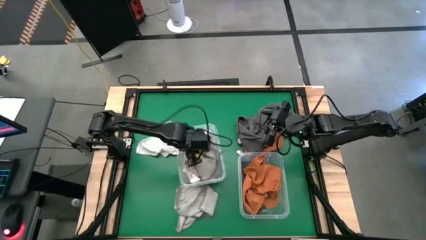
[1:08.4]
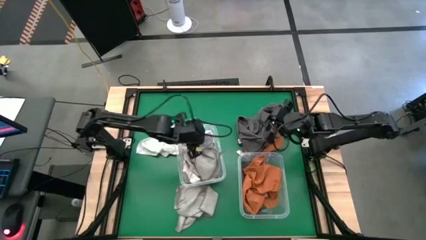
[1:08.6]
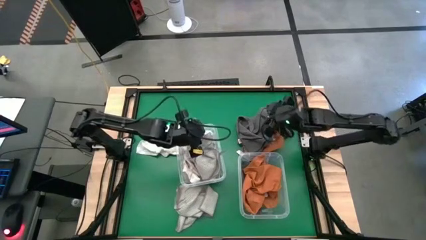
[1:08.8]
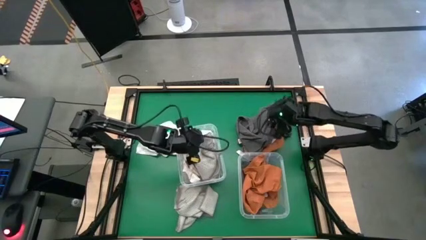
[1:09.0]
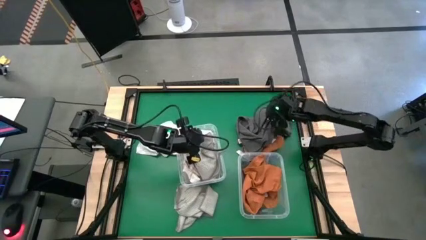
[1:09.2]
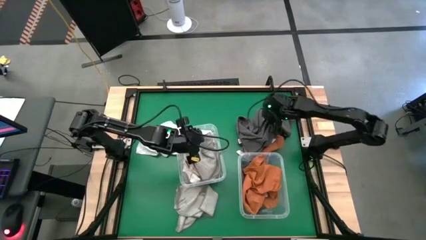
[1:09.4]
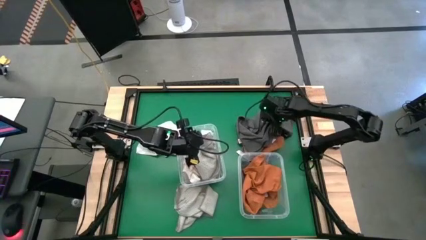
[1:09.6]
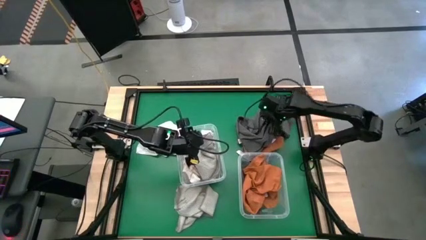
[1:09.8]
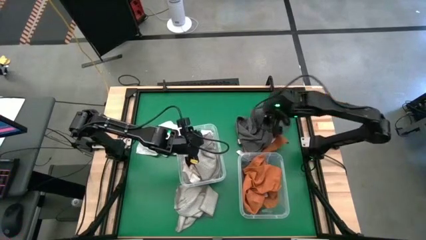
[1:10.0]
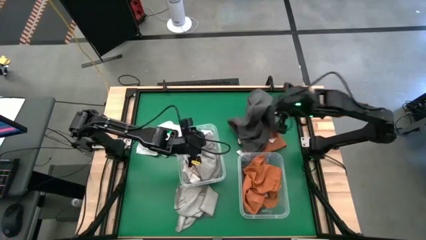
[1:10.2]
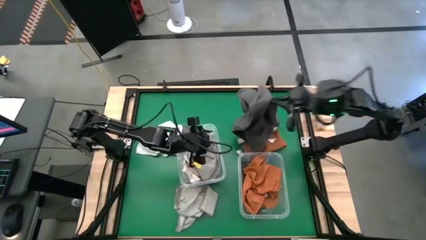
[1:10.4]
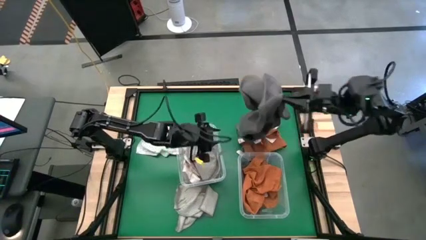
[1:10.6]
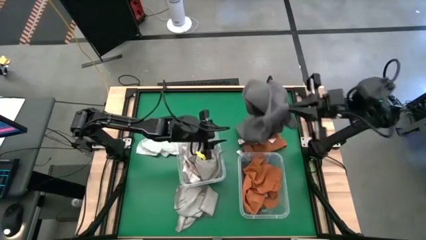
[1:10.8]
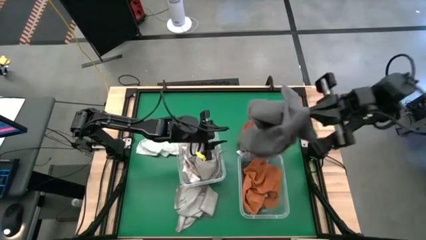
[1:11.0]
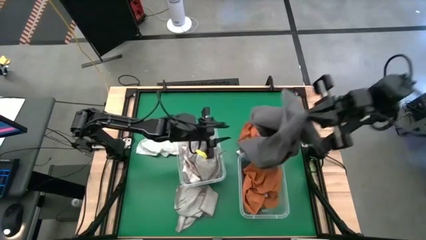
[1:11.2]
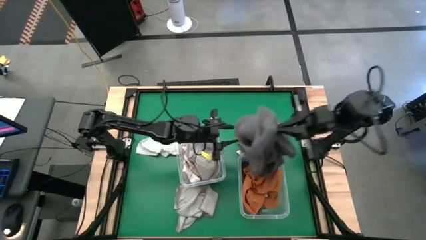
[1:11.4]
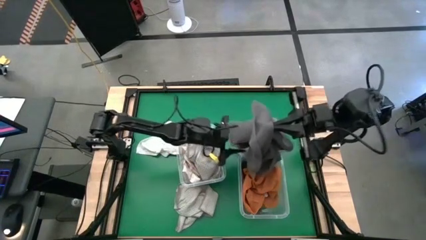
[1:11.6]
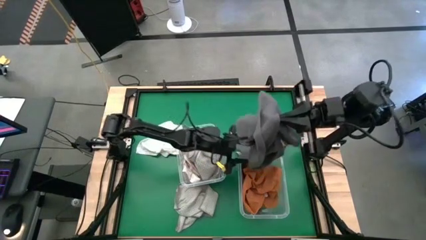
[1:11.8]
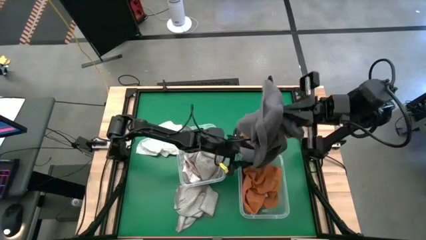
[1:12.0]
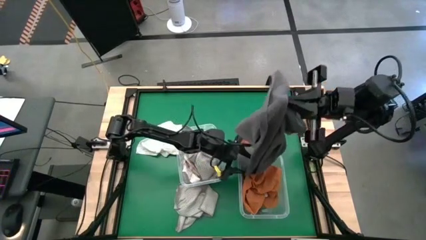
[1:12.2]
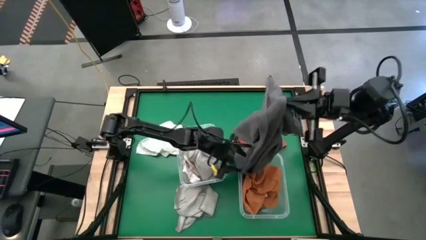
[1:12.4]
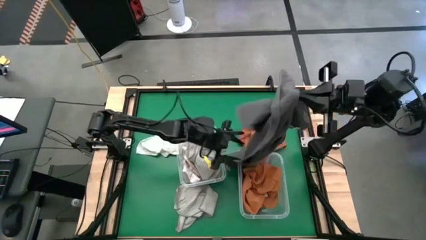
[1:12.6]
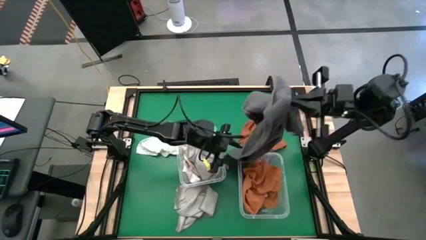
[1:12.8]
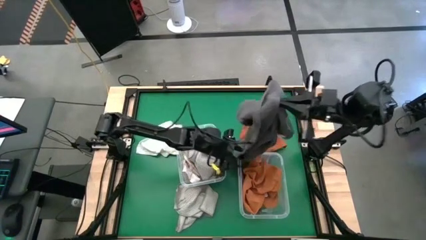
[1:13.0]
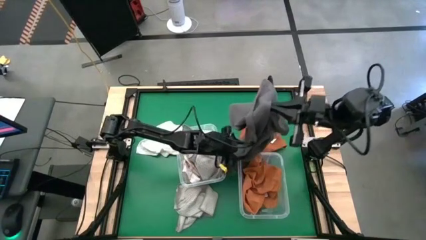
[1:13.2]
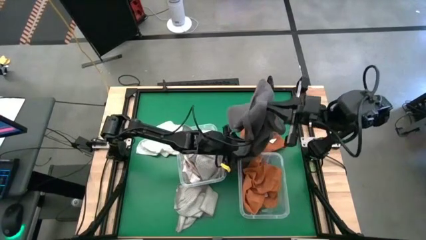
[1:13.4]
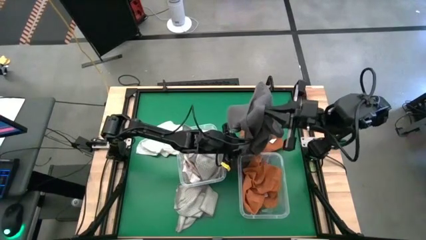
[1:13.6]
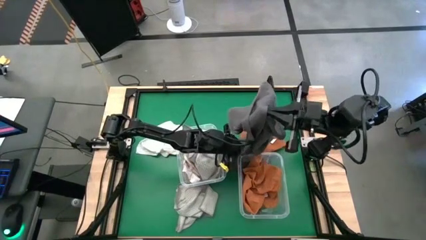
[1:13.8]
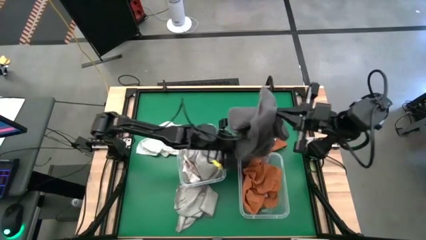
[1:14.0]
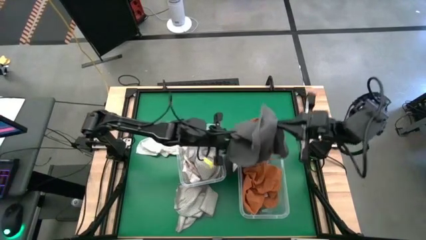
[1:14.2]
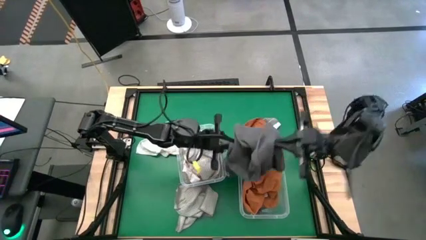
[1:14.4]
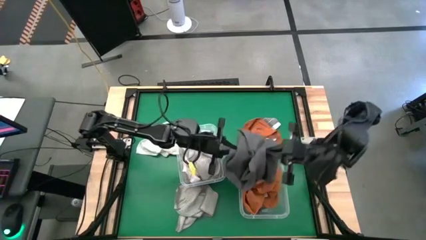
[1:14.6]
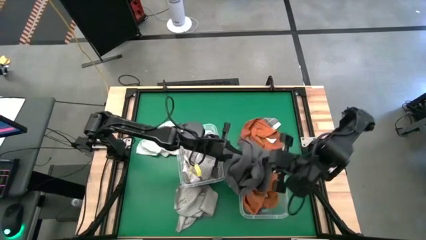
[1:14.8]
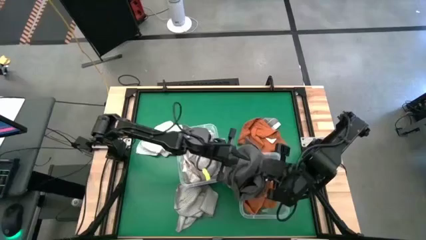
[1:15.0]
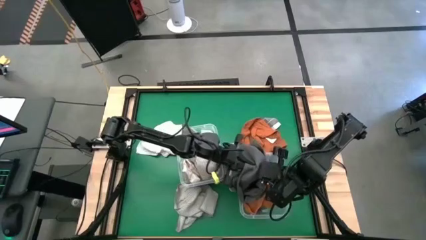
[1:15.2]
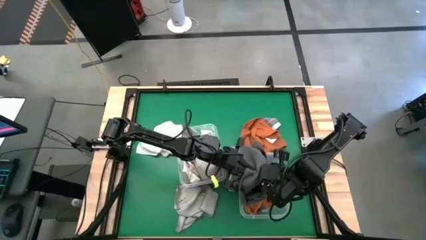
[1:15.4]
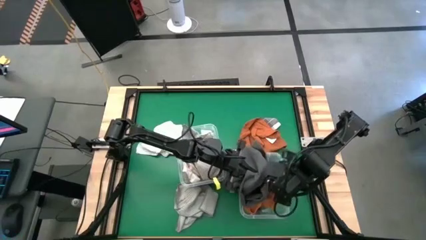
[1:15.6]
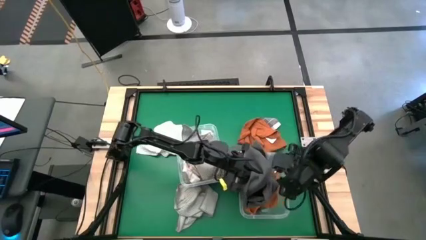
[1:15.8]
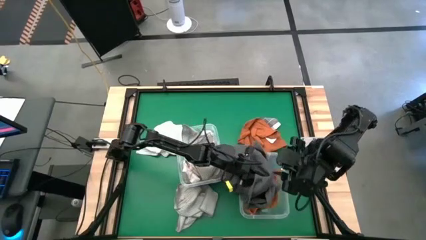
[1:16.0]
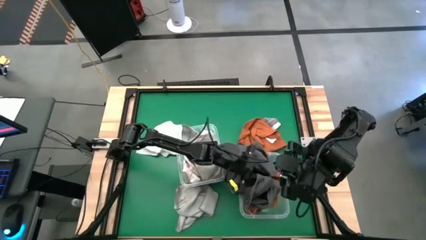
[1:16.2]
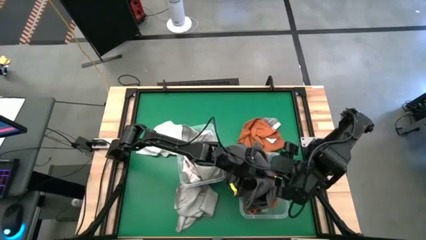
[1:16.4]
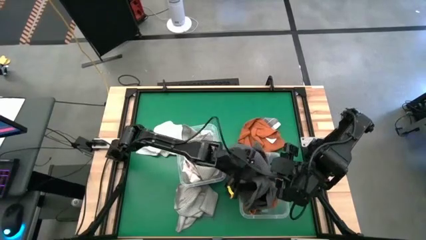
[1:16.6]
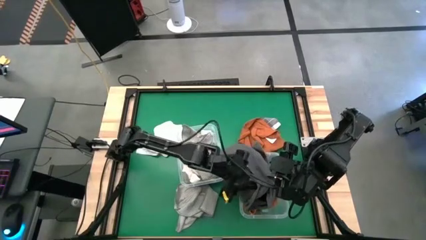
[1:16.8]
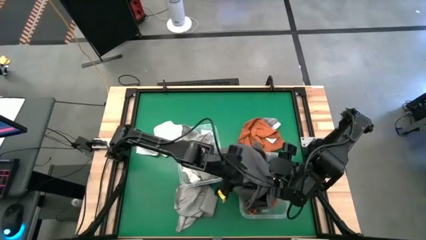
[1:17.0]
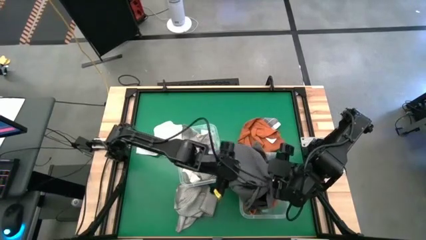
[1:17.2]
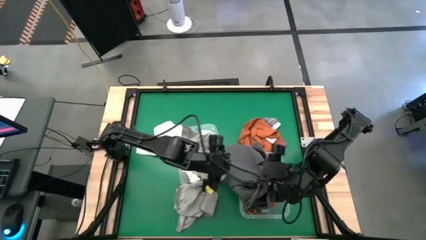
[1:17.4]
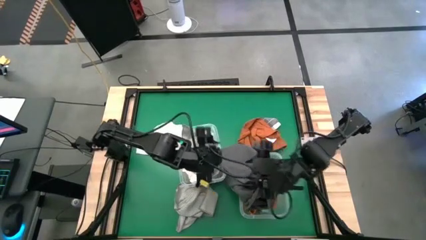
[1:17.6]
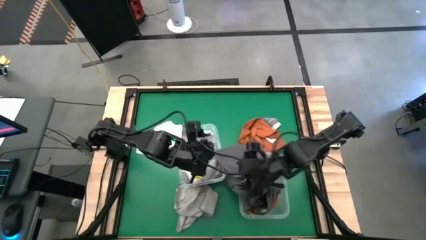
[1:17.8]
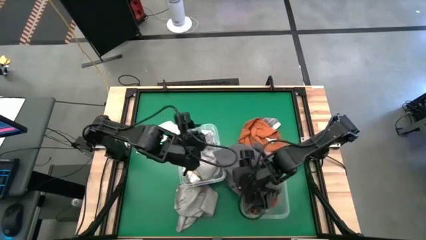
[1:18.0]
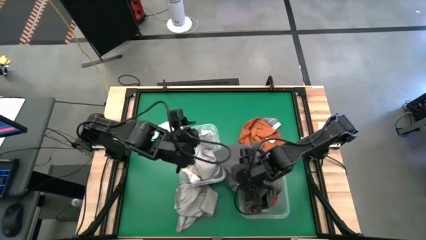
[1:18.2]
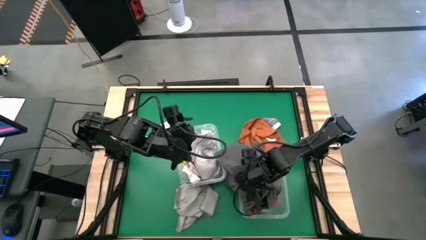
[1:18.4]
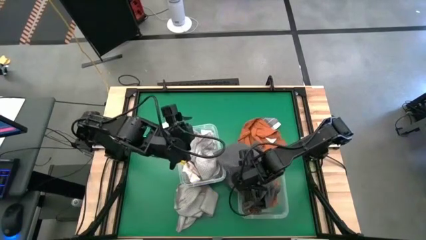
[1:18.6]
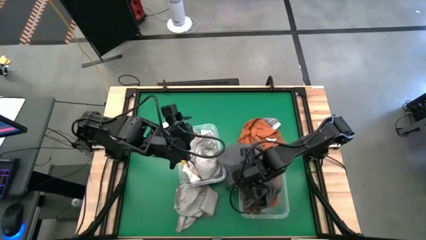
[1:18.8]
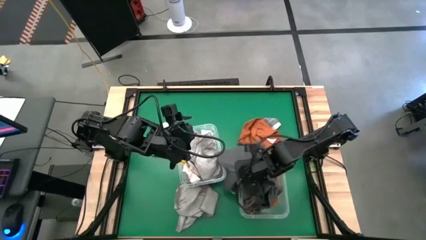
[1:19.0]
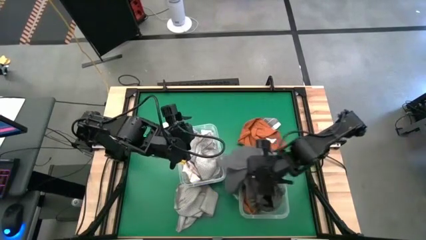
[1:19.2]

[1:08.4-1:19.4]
Task: Sort microfiber towel by color & place in baskets
Put the grey microfiber towel into the right transparent bin
